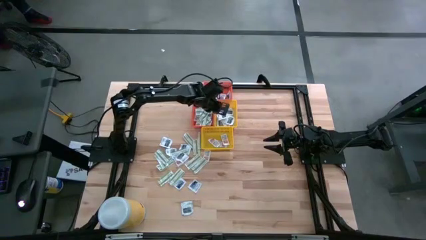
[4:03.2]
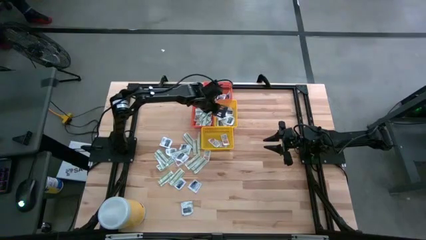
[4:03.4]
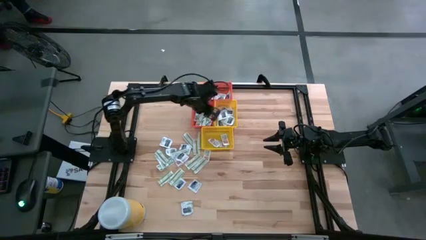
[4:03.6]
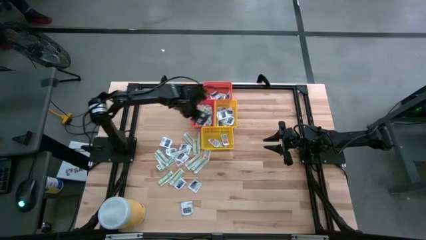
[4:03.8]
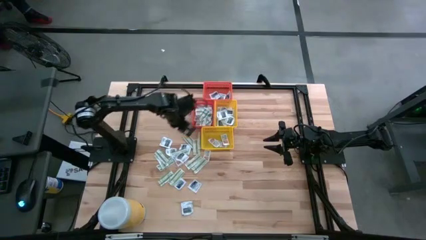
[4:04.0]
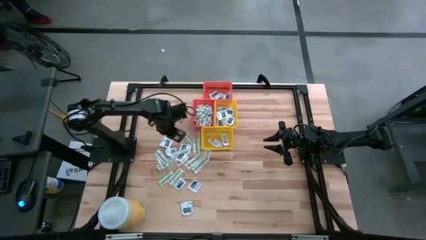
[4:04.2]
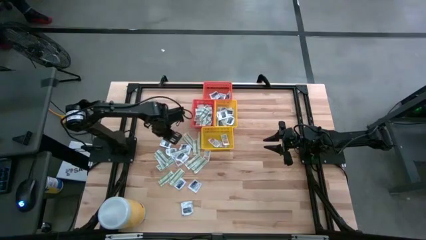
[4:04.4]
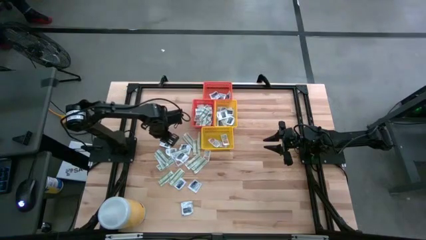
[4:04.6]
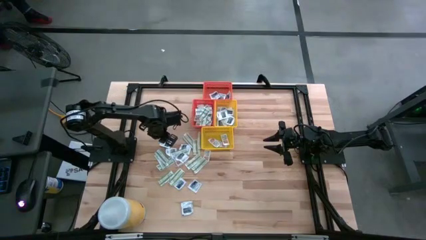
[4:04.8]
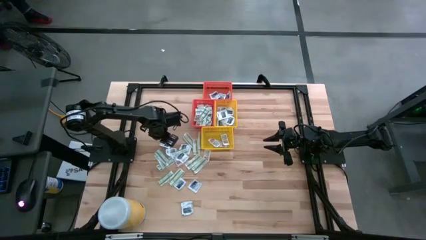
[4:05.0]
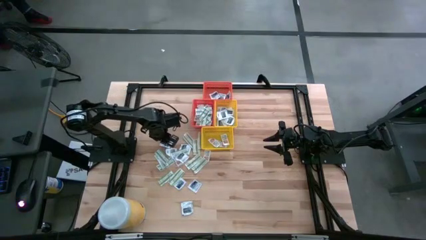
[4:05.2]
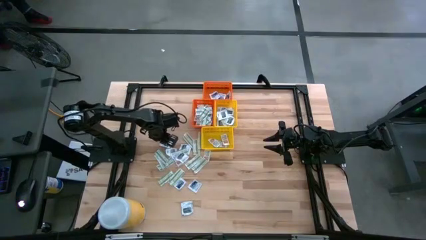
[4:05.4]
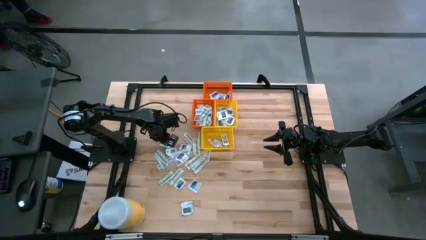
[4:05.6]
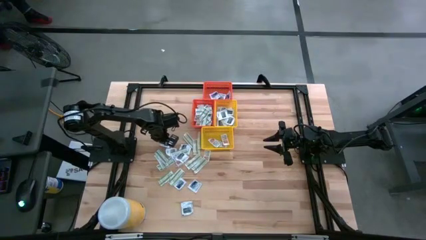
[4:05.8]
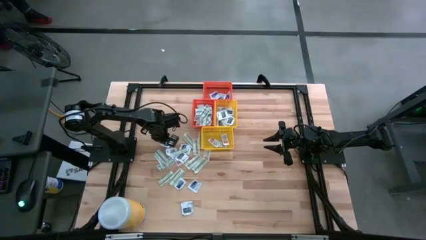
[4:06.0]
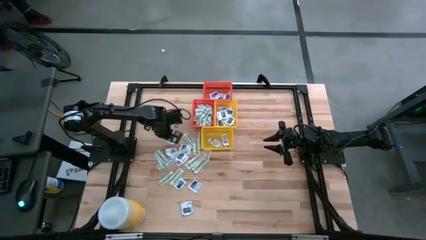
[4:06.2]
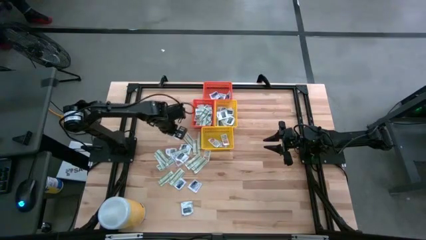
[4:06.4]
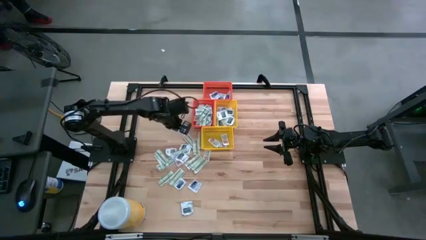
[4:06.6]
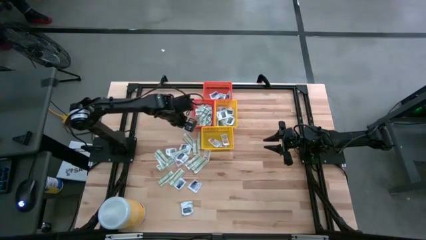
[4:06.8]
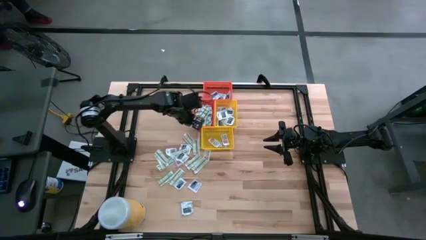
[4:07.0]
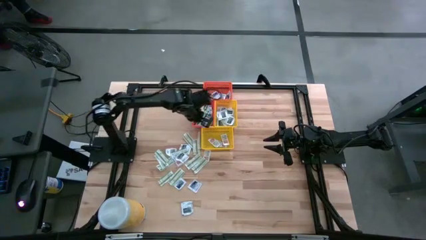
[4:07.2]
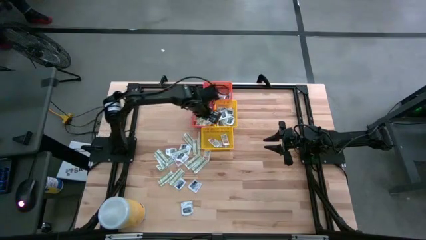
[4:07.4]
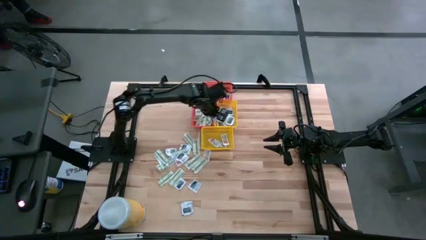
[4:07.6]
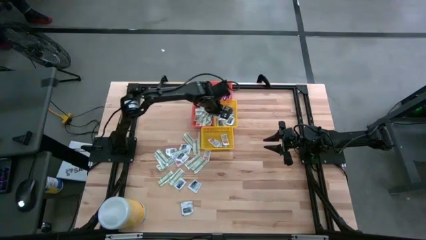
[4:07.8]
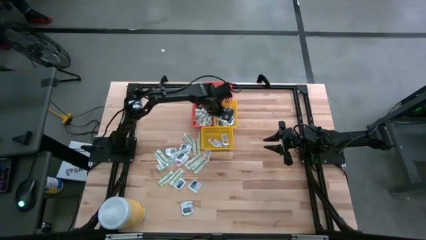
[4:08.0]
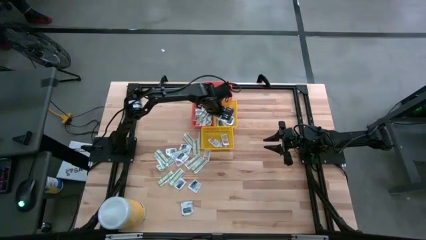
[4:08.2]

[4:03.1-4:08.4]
Task: Pick & Place First Aid Supplies
Put the towelette pack into the top yellow bin

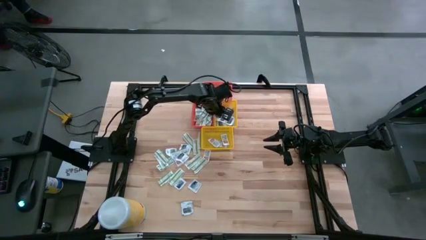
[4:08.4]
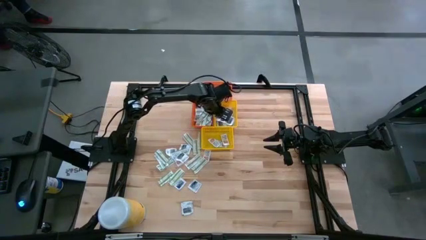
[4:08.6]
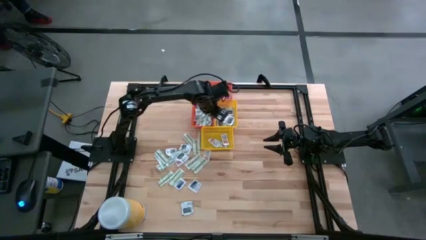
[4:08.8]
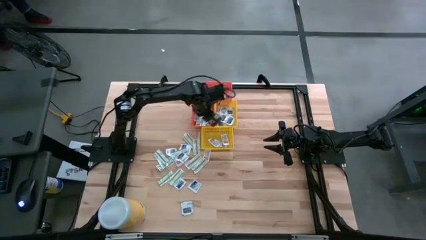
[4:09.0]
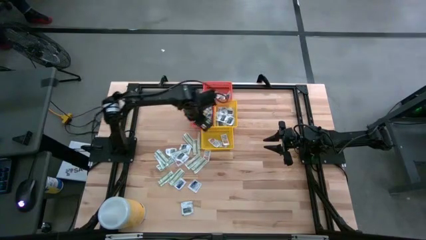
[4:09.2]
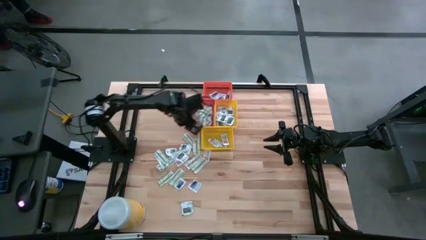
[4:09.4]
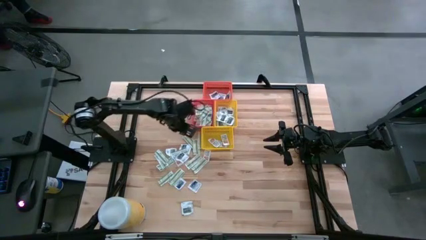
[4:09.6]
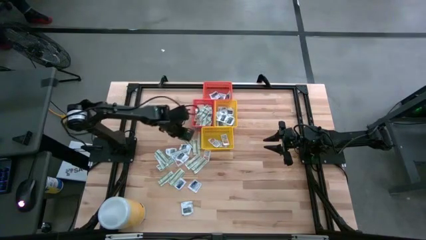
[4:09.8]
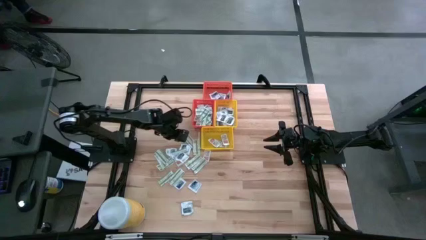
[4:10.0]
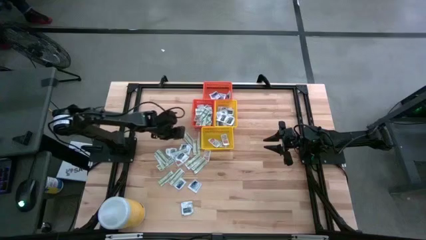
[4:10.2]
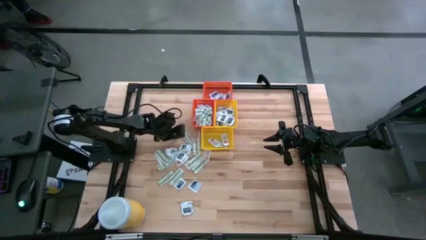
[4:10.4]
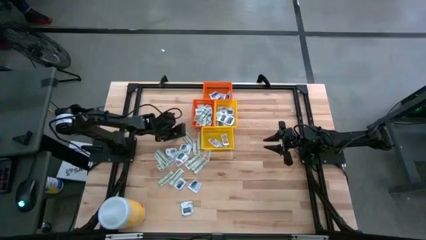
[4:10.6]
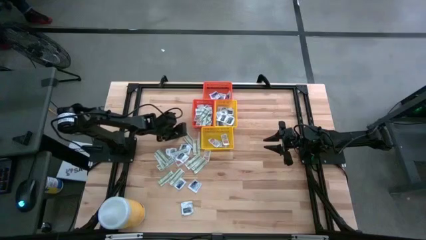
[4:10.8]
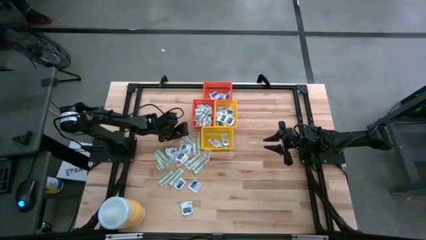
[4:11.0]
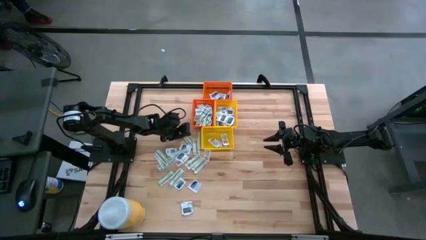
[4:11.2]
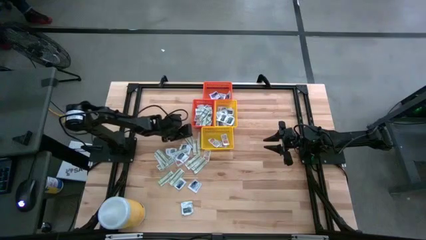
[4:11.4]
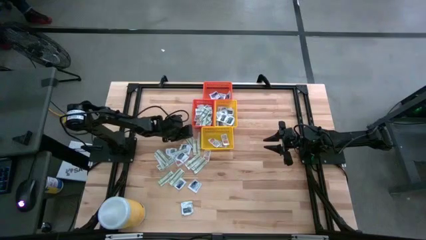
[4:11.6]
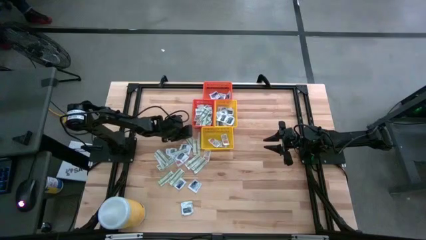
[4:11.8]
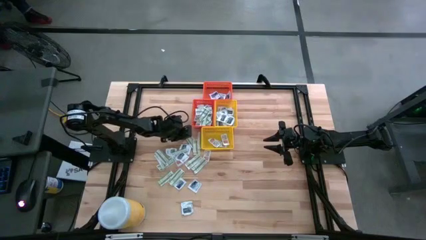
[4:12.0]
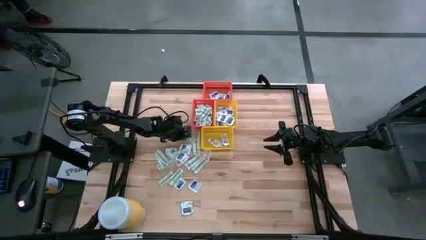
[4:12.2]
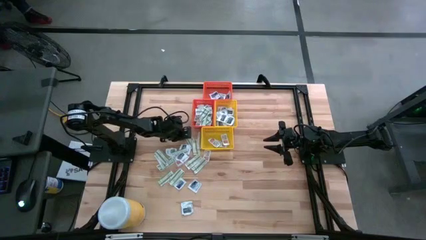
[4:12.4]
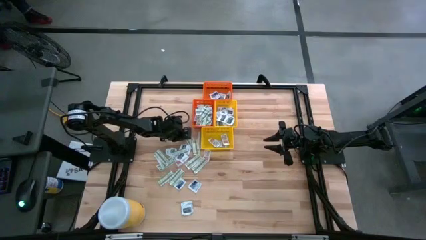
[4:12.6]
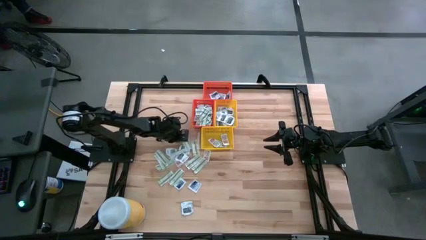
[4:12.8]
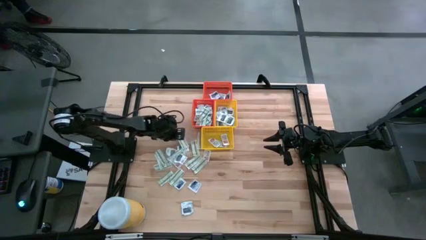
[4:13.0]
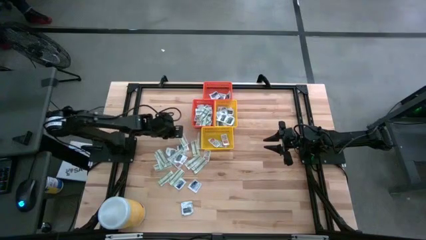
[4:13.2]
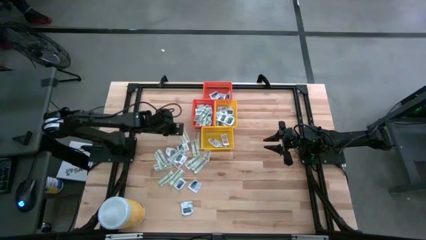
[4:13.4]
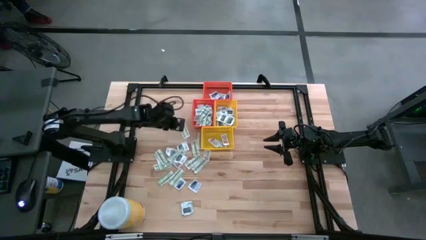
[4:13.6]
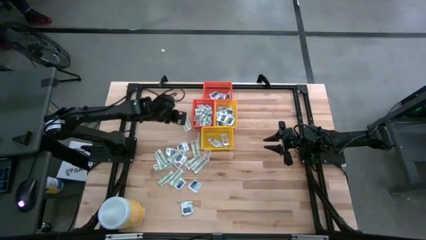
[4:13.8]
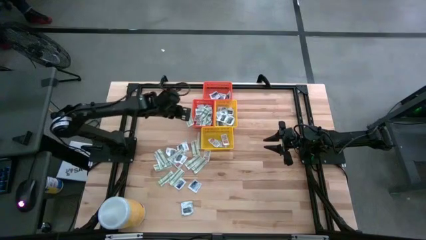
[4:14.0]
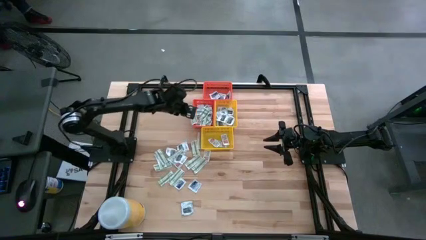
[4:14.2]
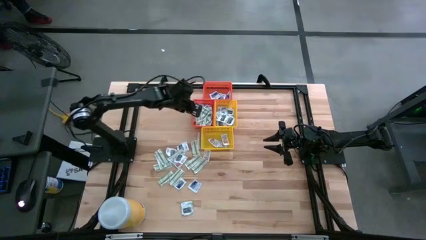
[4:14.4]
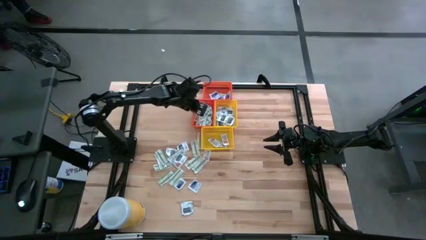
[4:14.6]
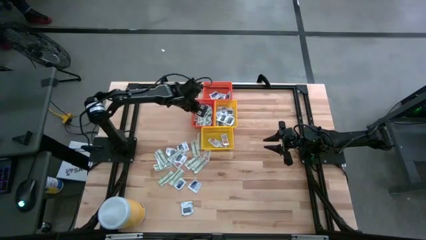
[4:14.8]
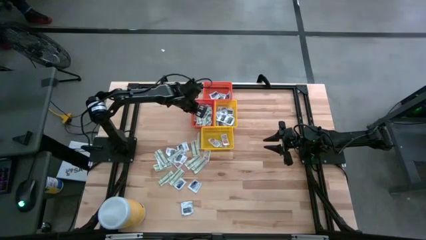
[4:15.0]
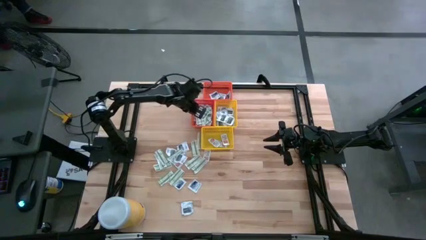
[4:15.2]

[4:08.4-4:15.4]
Put the bandage into the bottom orange bin
